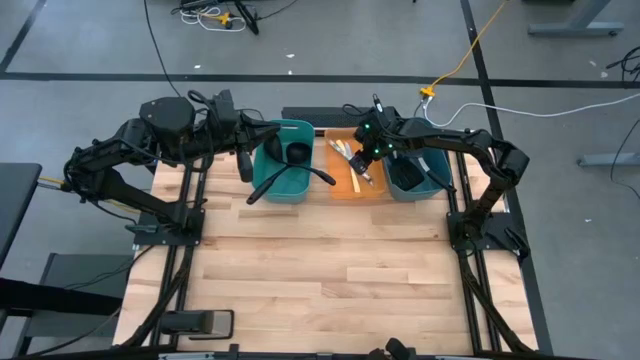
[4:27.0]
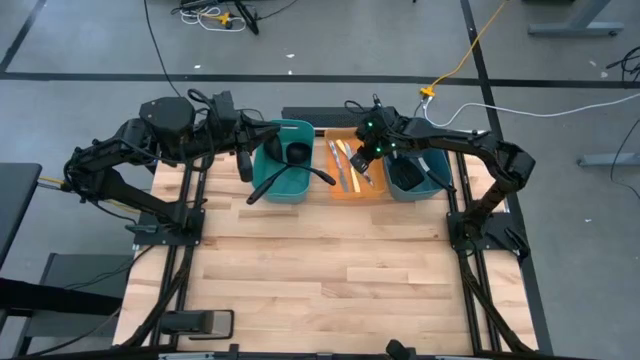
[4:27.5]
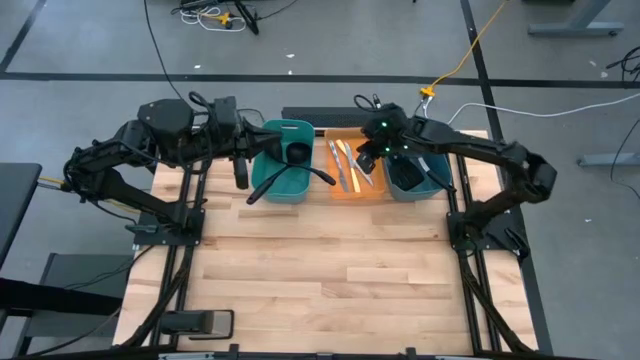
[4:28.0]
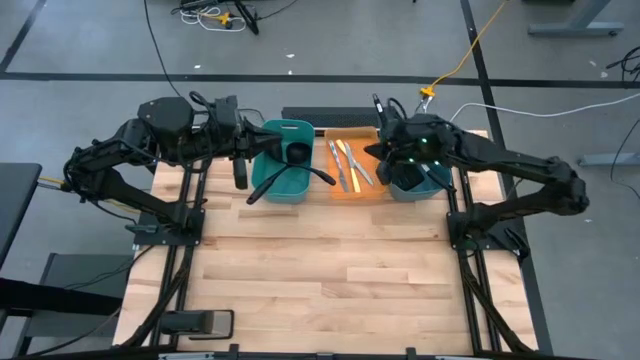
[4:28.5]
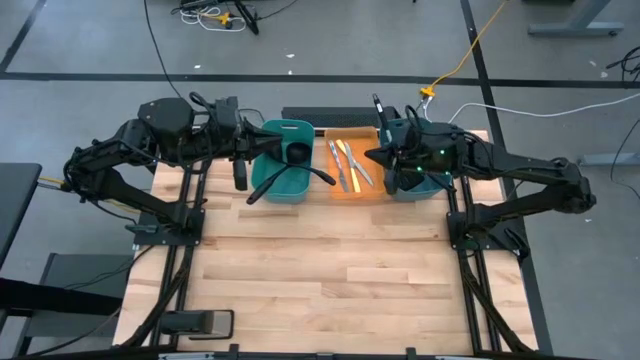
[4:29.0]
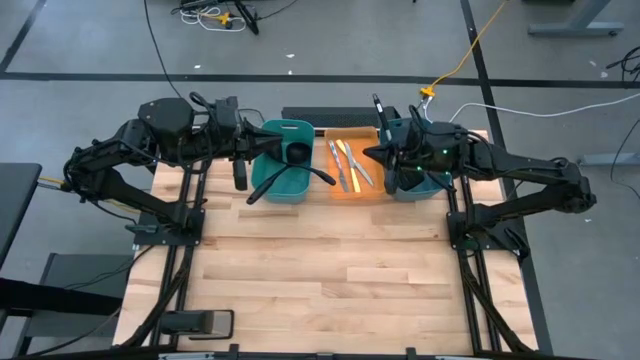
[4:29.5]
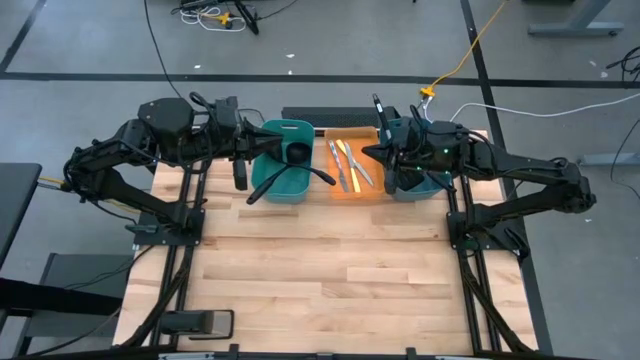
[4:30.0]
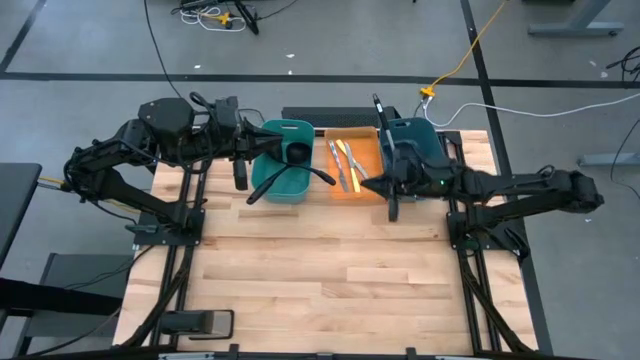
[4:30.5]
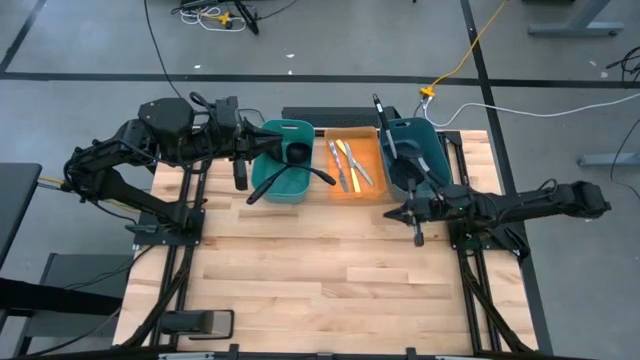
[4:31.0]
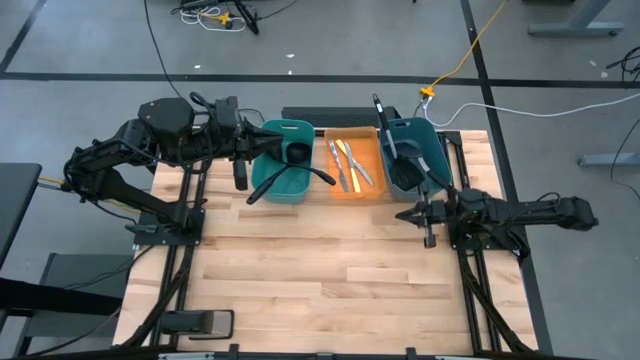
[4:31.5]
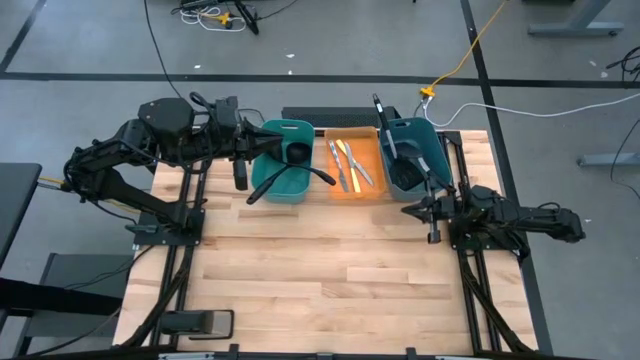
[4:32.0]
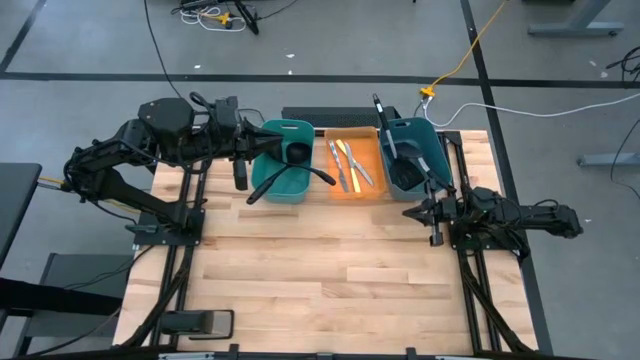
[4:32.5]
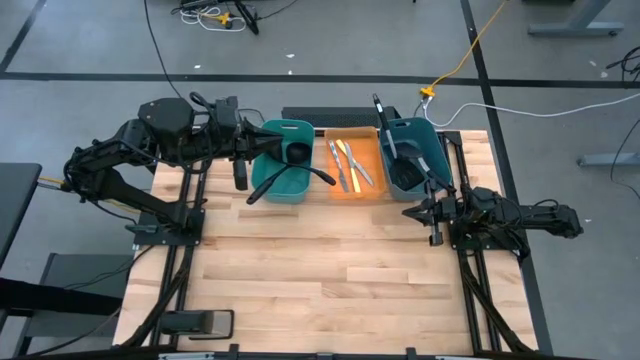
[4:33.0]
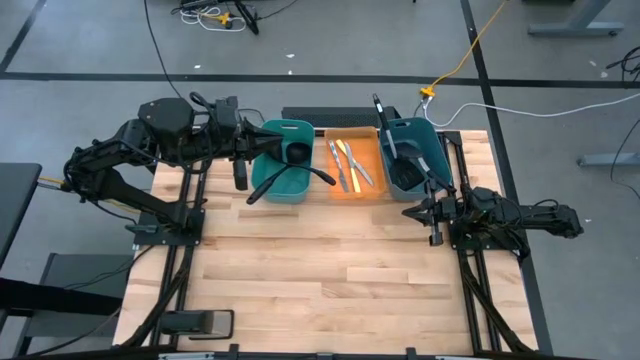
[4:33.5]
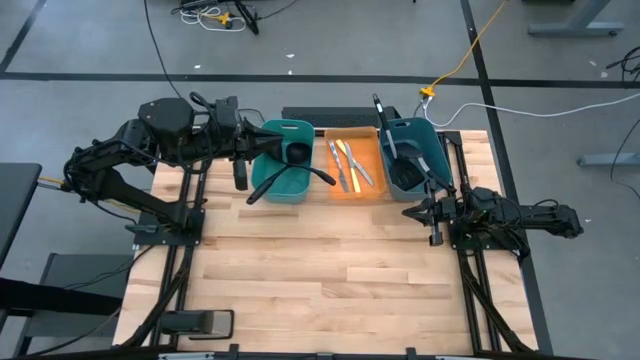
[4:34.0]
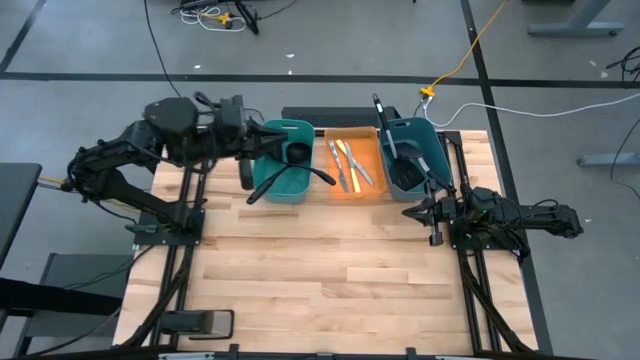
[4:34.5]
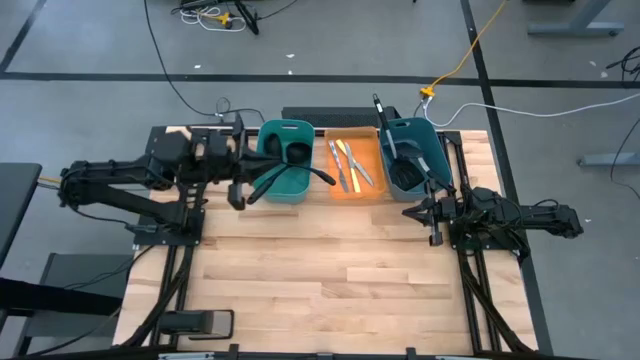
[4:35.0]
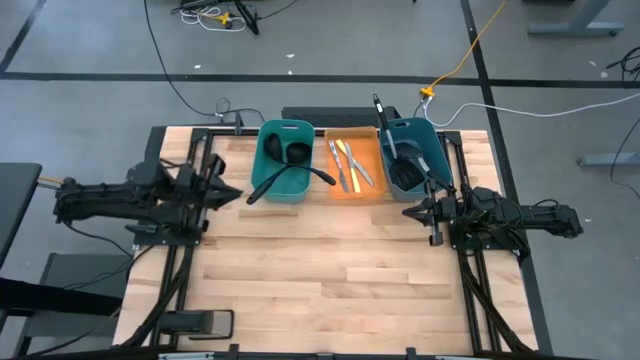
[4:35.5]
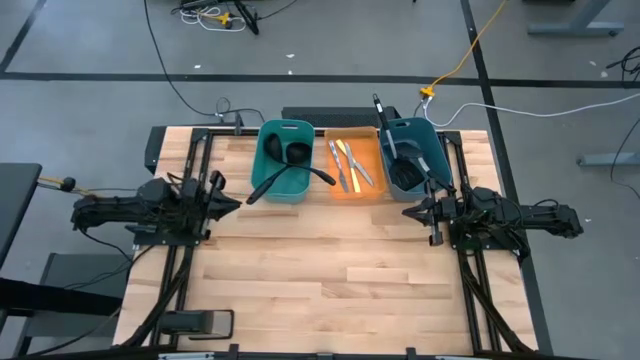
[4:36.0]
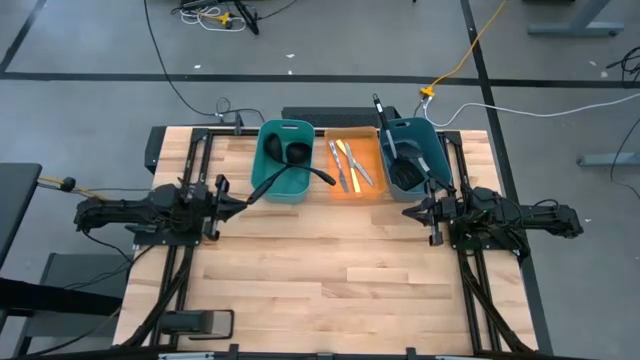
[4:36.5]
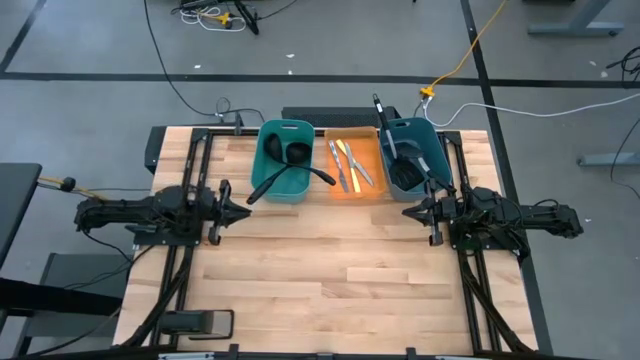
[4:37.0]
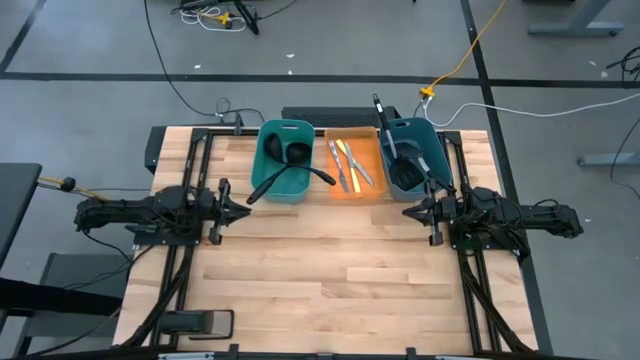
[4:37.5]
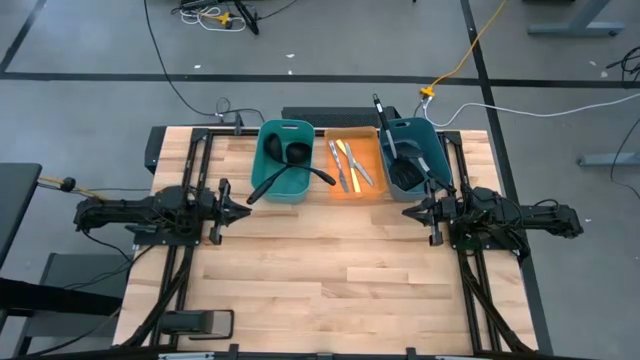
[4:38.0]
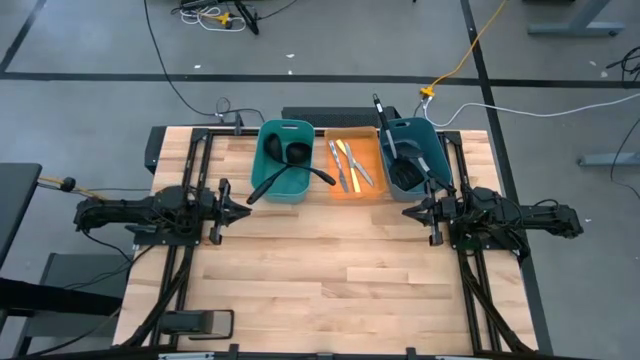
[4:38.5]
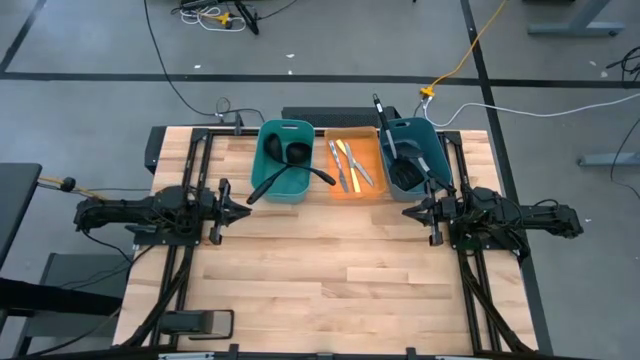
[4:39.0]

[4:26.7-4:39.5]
Task: Pick & Place Kitchen Items
Return to Home Position

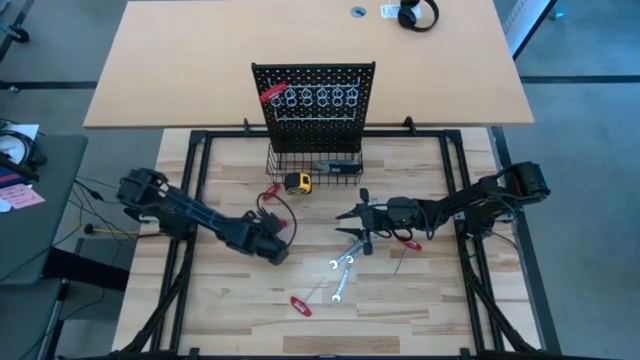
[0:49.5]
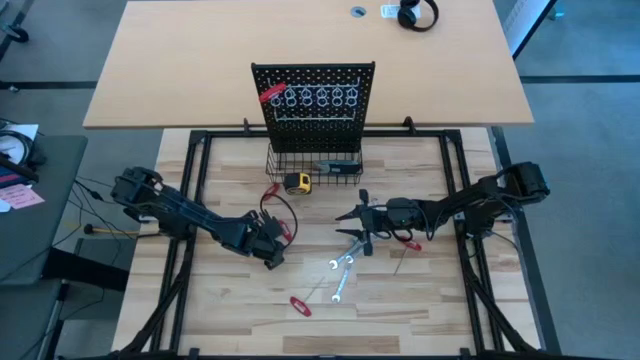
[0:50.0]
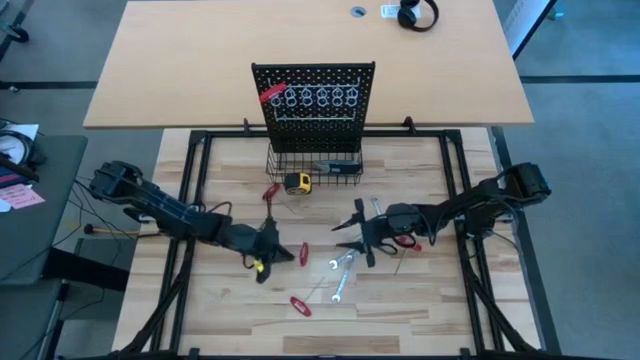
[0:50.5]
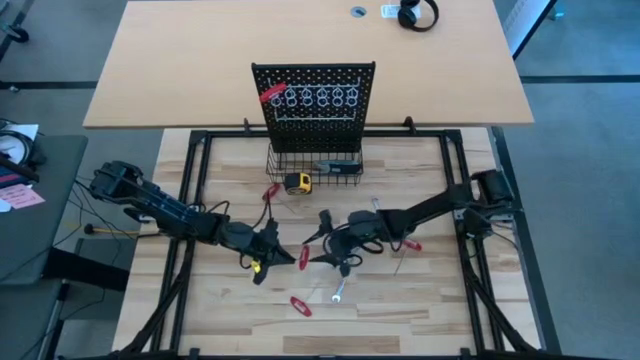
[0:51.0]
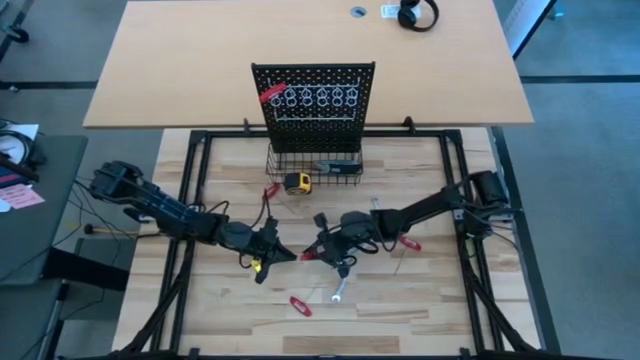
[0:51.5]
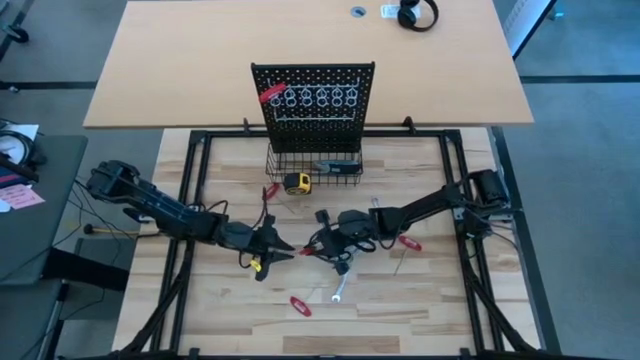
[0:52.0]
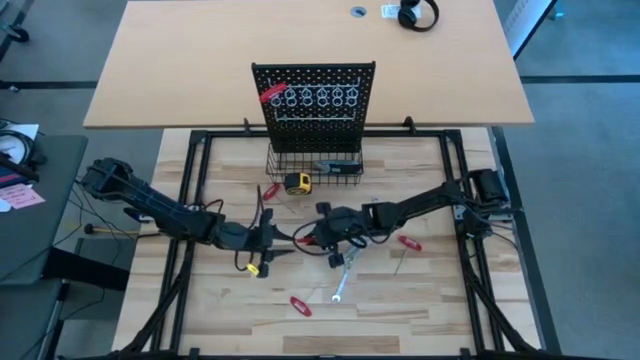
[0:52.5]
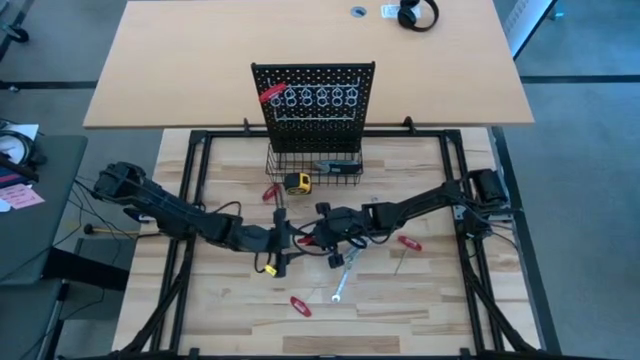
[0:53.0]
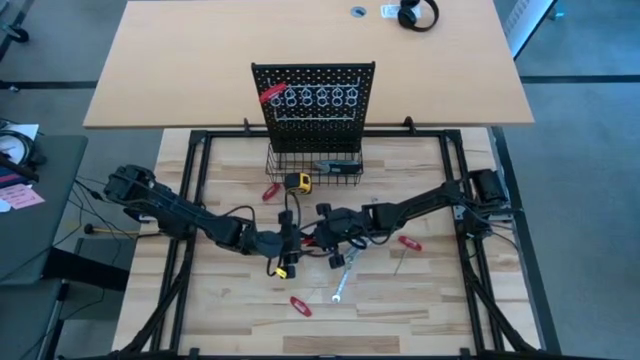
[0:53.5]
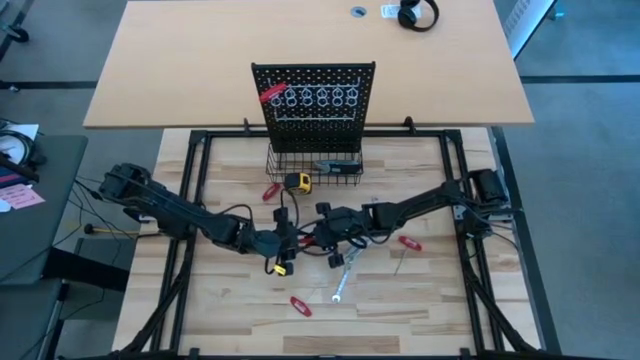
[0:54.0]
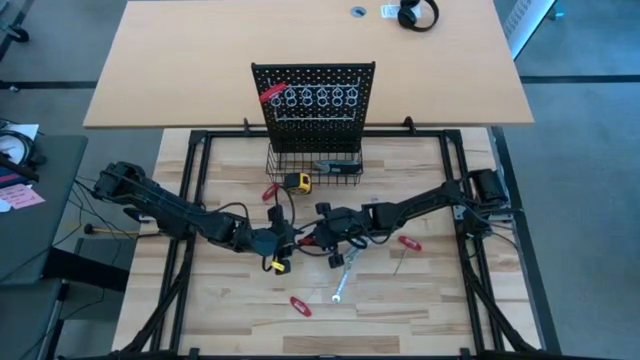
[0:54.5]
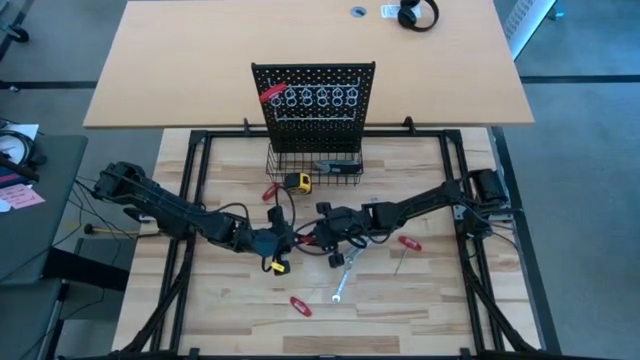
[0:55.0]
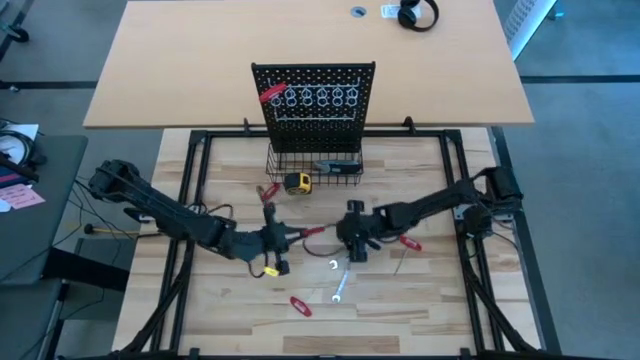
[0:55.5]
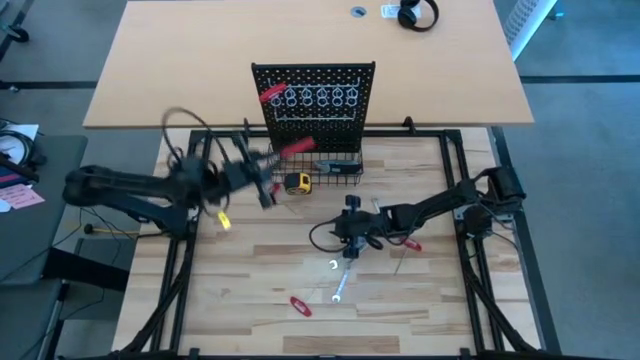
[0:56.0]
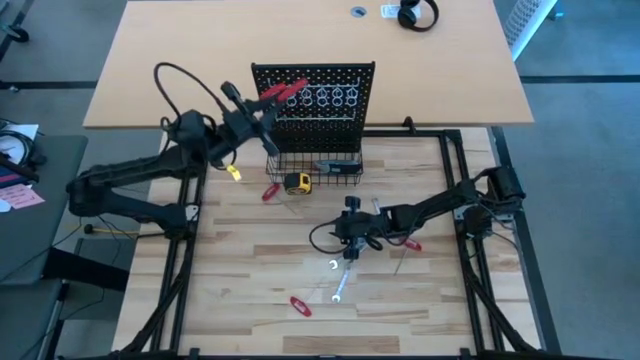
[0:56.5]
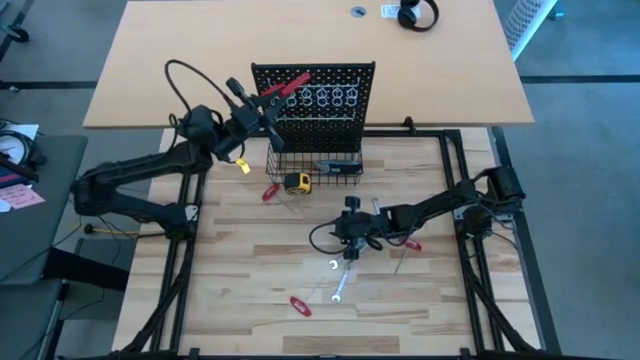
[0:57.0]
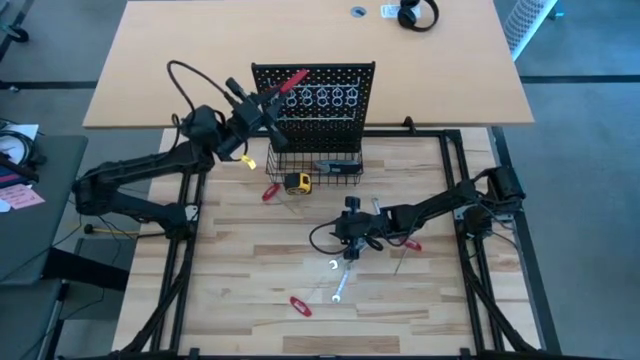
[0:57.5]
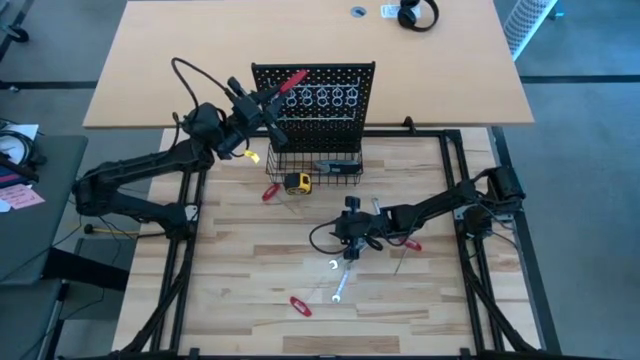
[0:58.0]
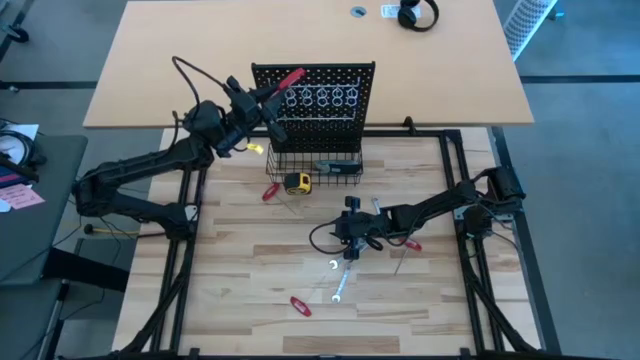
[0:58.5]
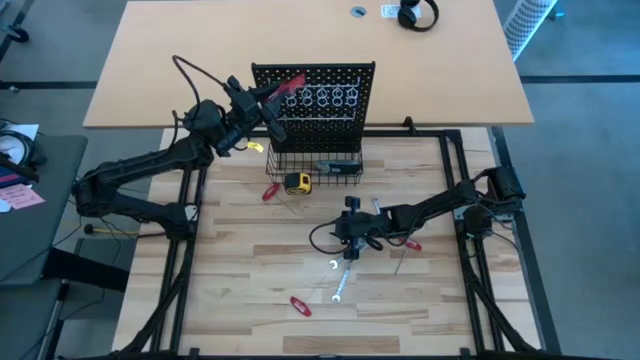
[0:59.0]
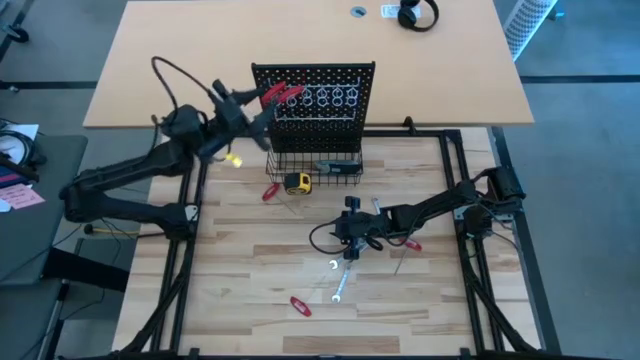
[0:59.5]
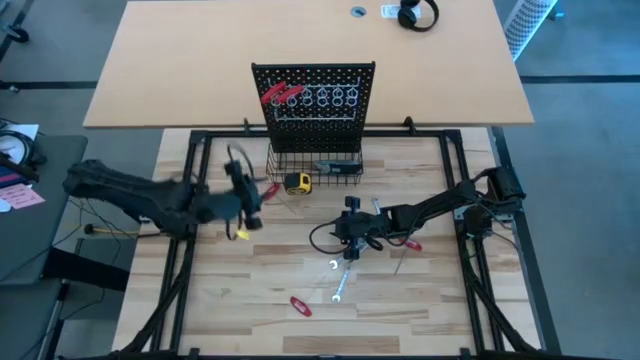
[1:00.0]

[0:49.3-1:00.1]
Task: Hang tools onto peg board
Hang the red T-handle Allen wrench into the pegboard
